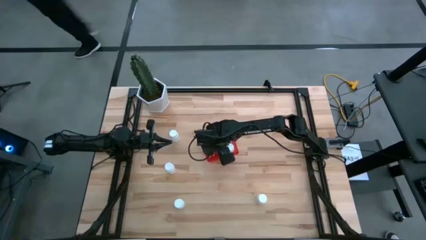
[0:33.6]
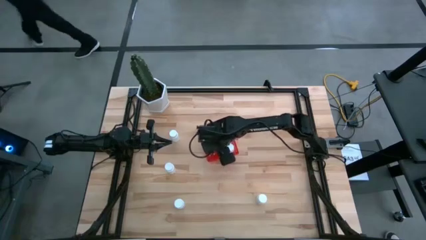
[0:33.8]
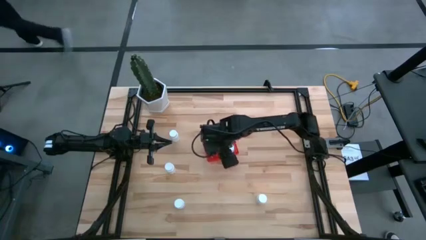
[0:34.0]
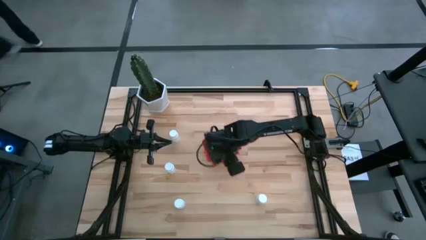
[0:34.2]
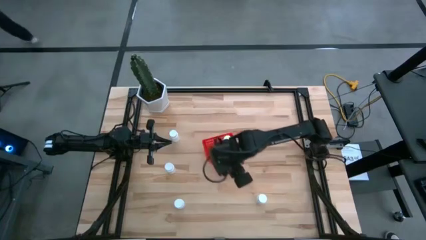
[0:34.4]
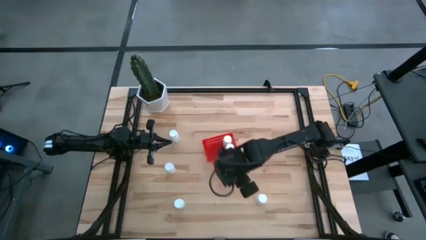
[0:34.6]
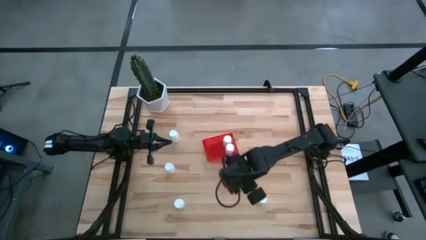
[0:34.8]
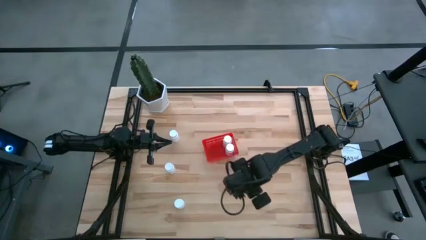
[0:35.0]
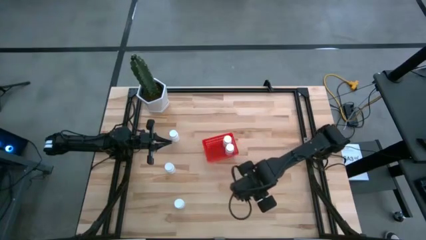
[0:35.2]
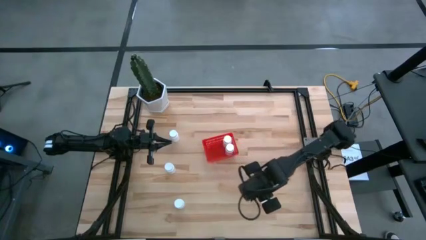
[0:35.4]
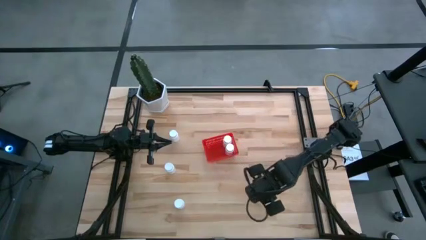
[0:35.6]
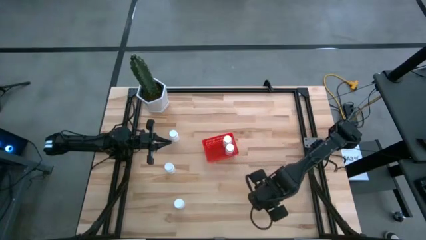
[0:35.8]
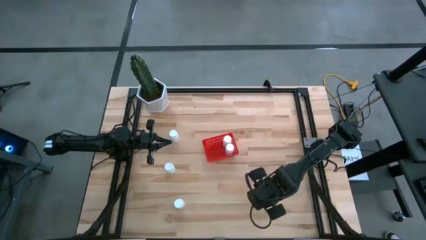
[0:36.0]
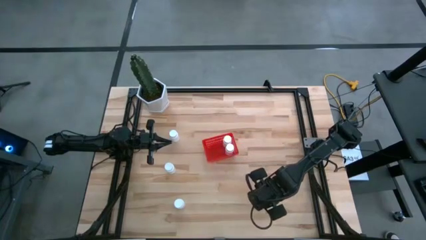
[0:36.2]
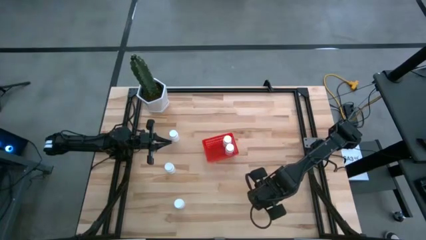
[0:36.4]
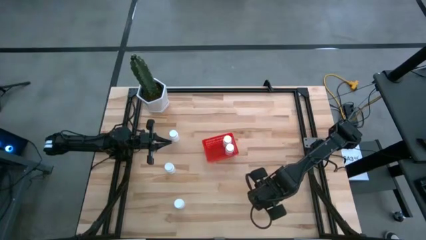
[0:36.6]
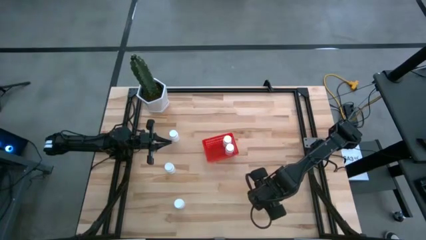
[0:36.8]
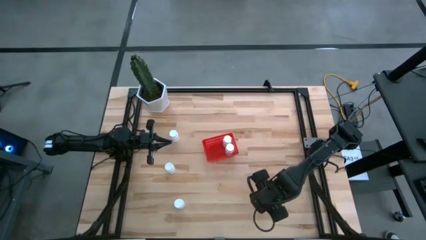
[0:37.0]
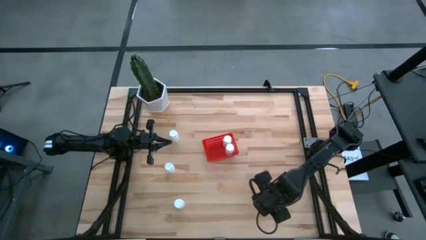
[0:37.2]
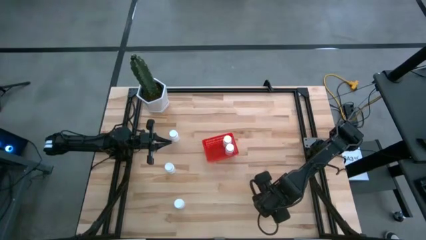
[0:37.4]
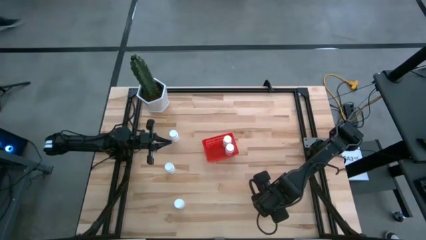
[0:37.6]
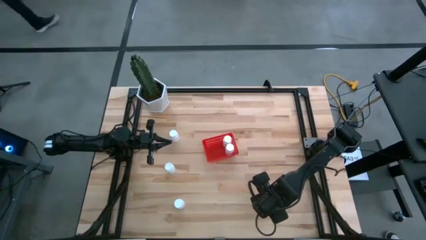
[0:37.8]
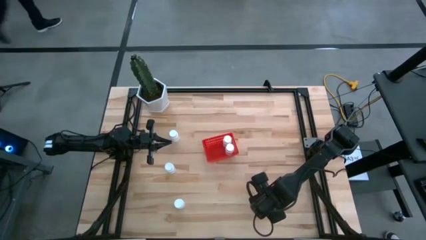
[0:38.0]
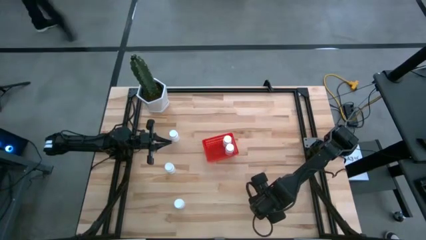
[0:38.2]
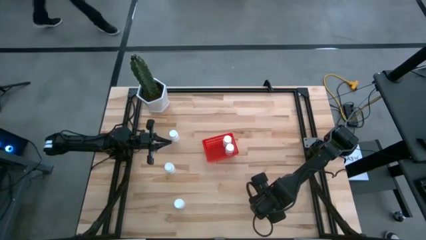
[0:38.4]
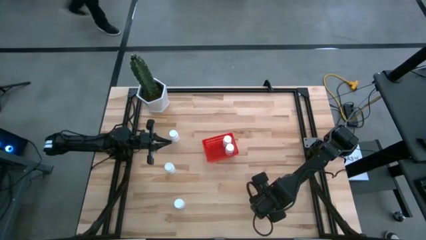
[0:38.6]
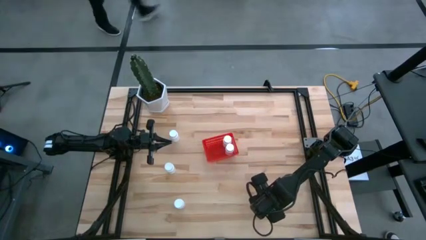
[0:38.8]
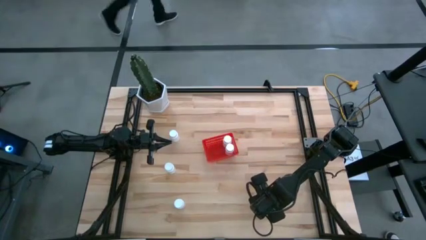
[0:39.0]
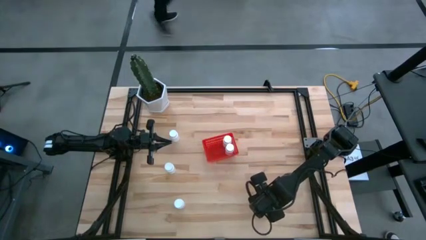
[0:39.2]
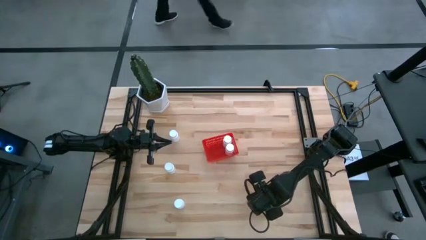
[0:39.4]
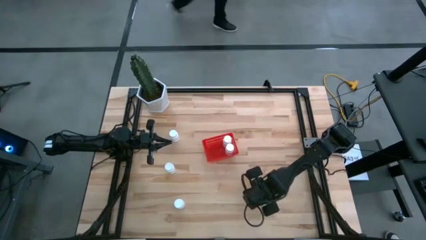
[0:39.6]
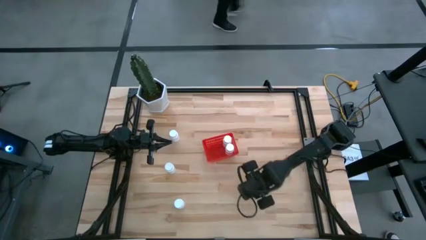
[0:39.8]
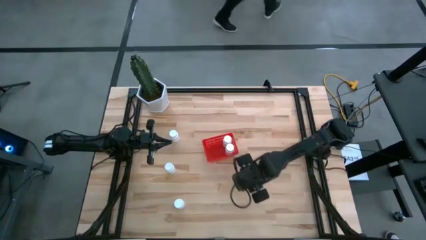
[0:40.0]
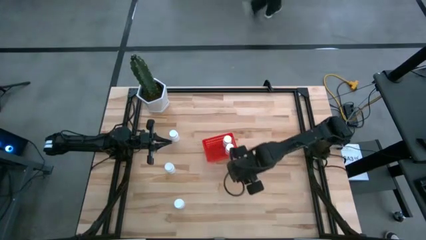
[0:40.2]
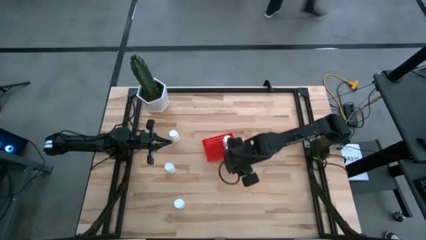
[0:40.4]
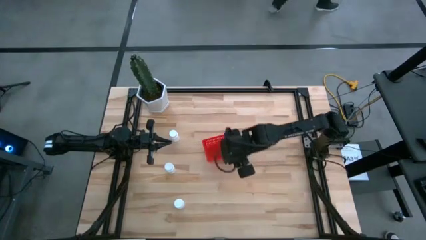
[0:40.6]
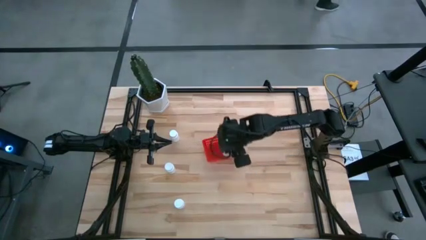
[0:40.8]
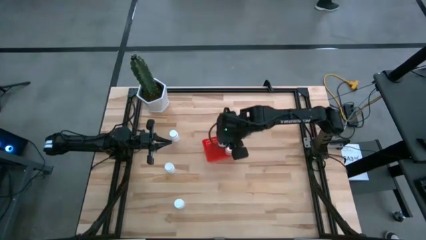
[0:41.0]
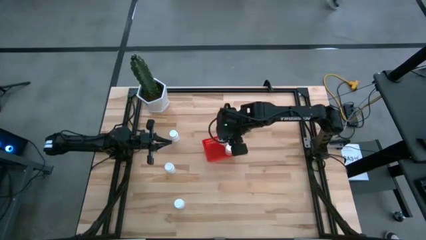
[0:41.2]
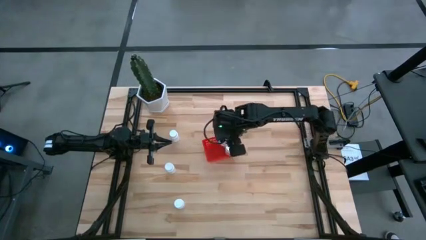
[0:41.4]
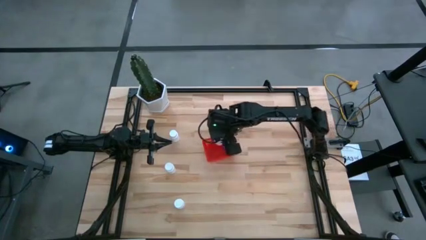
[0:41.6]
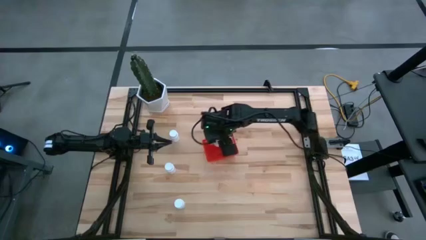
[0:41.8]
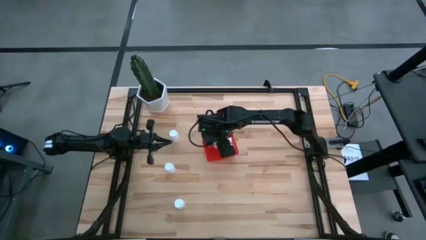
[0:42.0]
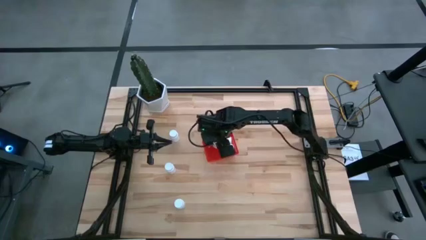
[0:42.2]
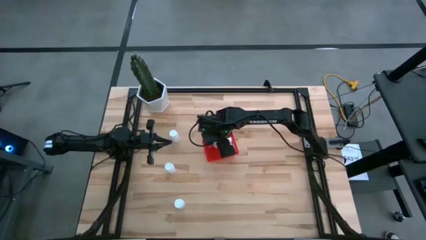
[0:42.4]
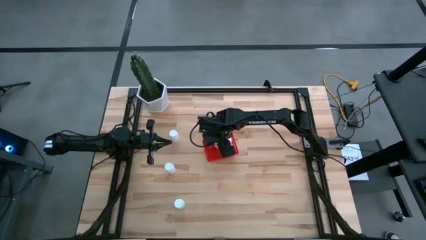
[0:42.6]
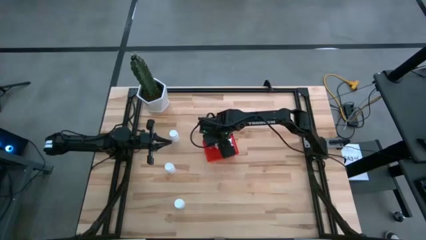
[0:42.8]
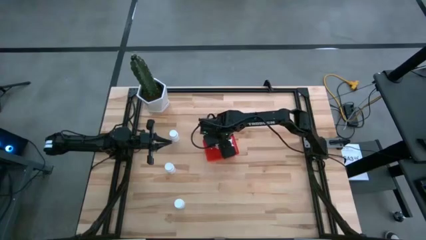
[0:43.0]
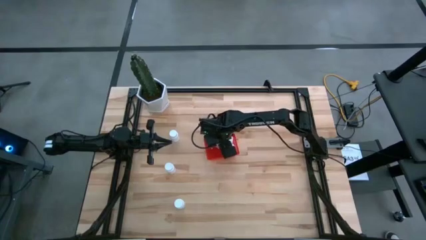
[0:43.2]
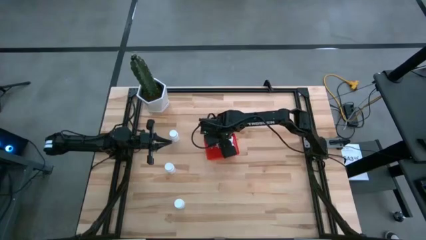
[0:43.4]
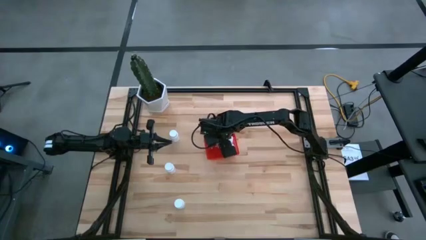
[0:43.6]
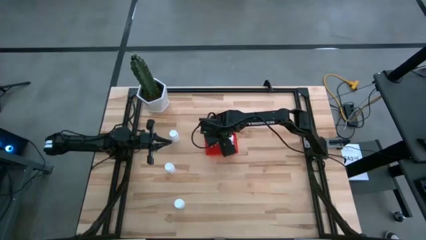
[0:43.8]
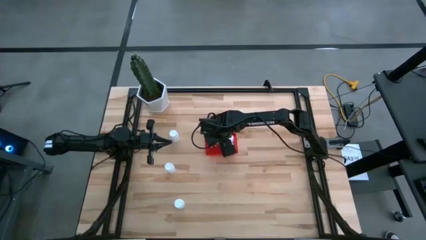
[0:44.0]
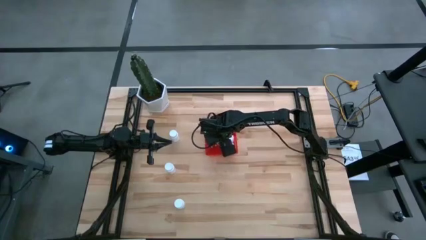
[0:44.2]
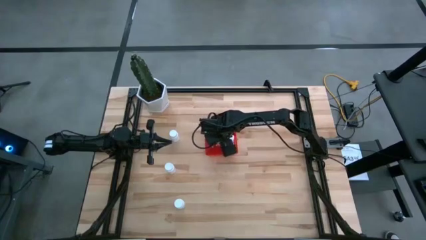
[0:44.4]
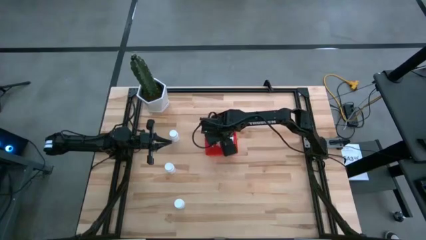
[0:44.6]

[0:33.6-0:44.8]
Task: Pick and place pill bottles into a basket
Put the white pill bottle into the red bin

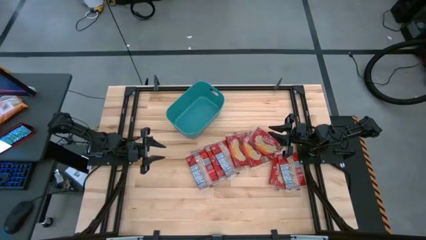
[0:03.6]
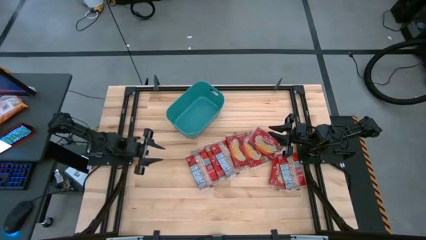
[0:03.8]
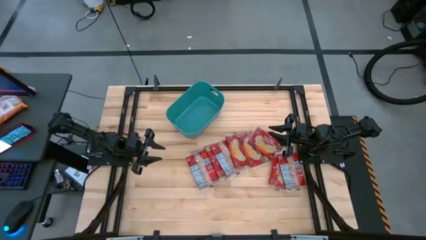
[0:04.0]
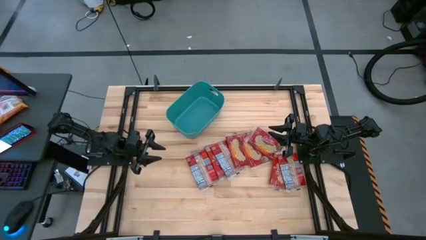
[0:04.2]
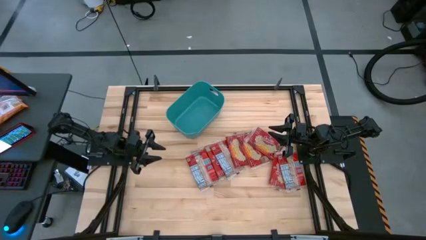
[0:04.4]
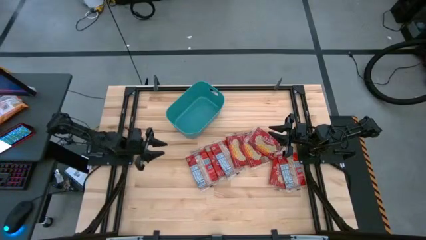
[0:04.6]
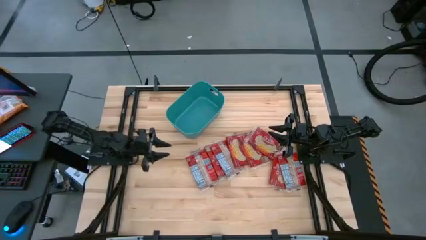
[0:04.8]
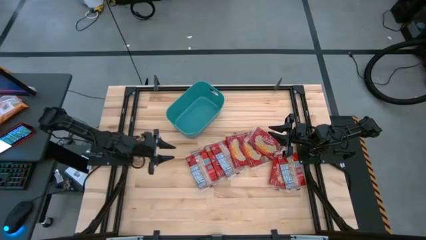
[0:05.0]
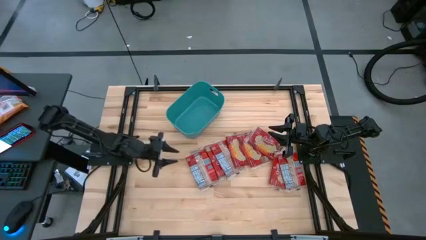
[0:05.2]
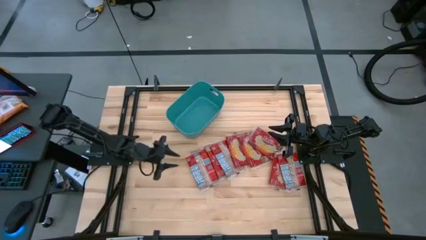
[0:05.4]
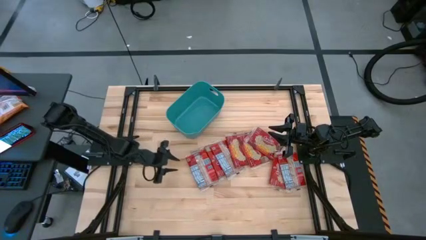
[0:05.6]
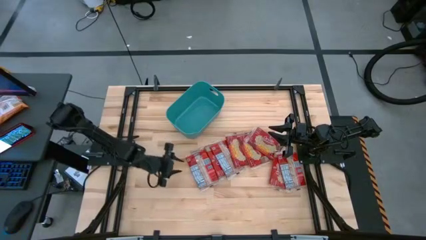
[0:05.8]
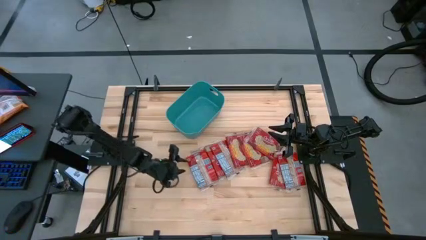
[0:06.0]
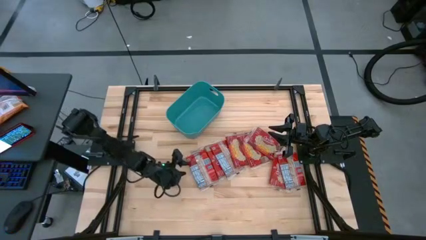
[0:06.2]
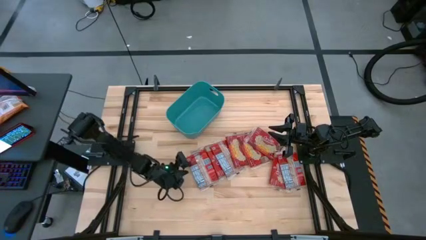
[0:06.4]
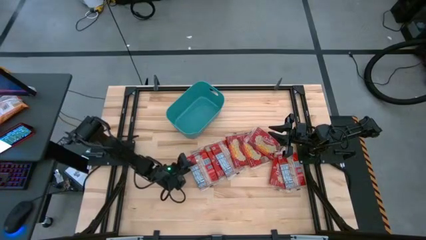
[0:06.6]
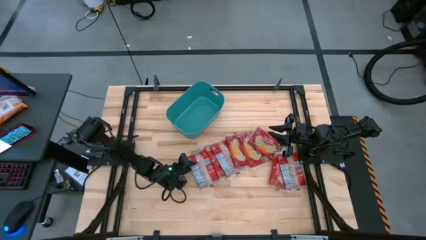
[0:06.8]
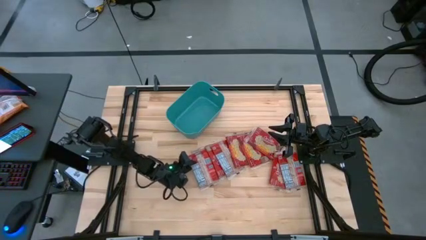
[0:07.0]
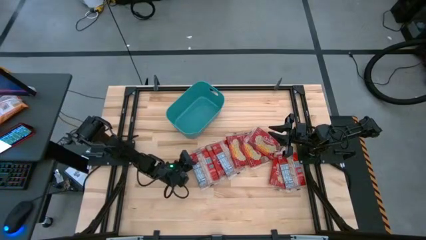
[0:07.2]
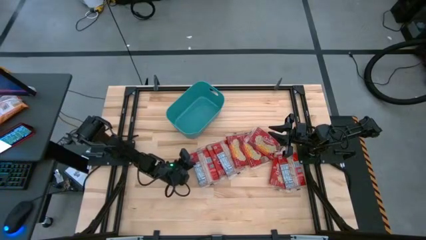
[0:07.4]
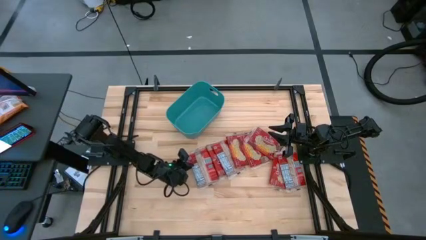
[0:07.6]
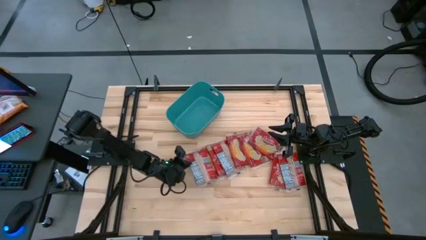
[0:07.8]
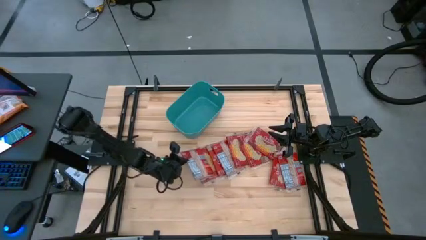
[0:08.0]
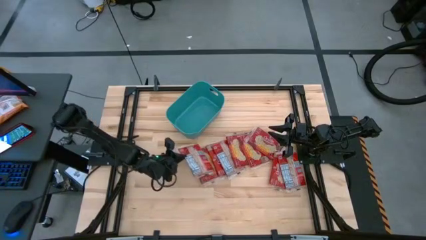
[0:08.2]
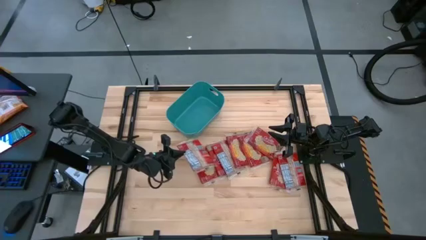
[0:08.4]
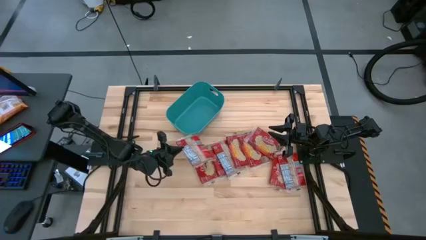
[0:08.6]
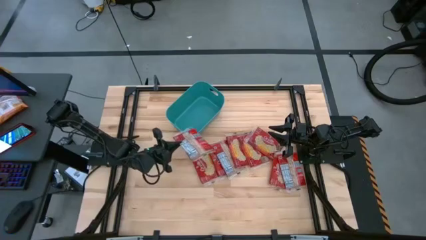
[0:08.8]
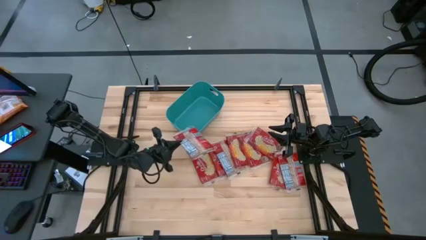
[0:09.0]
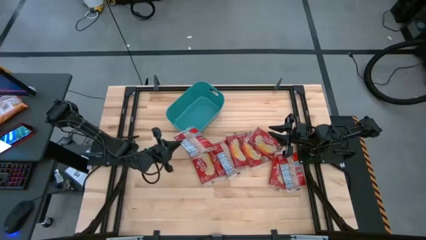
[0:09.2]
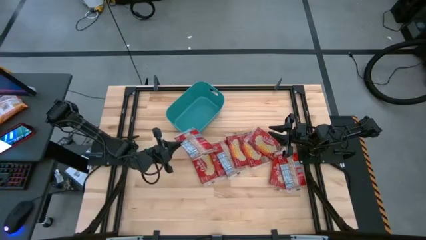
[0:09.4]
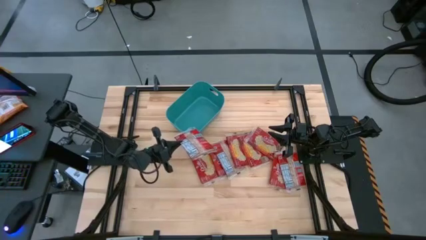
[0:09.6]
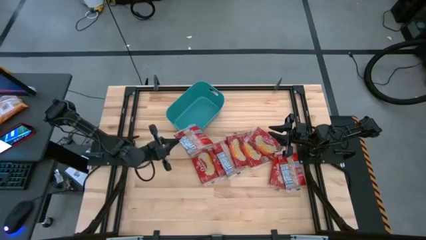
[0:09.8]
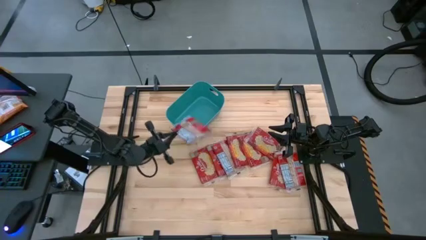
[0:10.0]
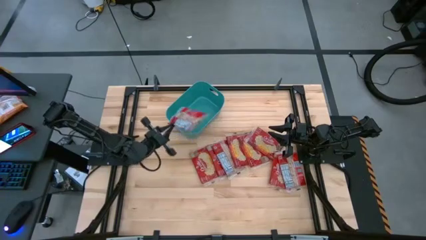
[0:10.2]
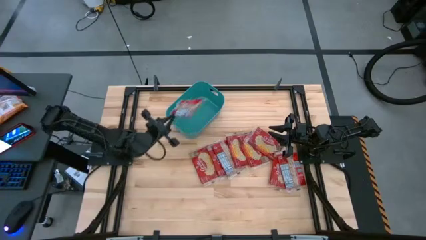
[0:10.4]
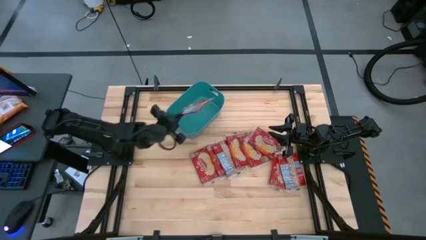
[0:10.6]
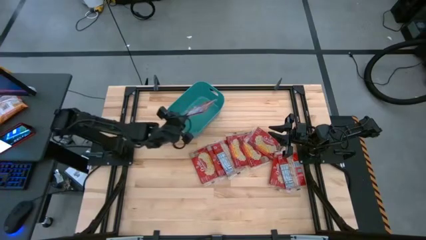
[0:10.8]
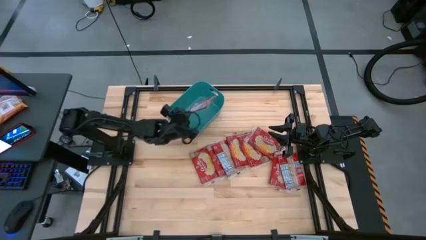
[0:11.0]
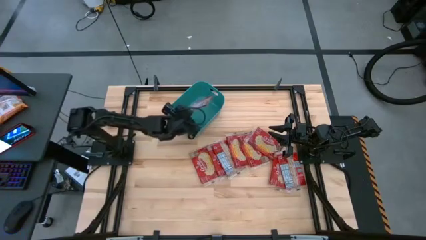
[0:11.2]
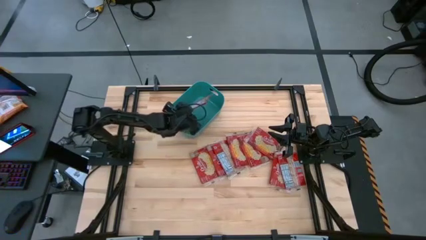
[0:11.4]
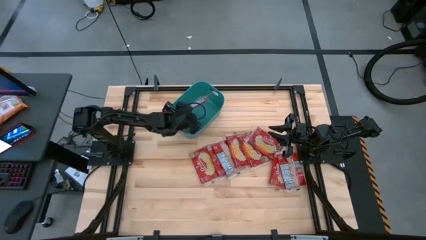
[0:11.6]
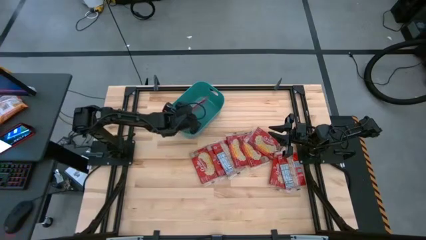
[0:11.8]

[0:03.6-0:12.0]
Task: Sort popcorn bags into baskets
Put the red popcorn bag into the green bin
